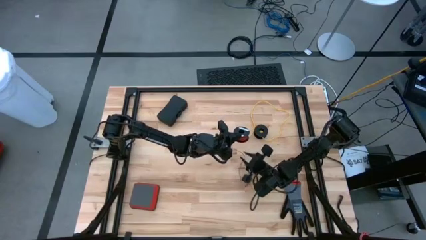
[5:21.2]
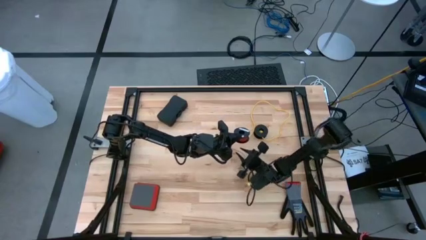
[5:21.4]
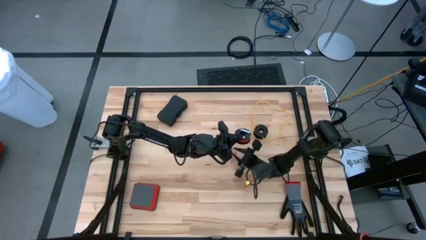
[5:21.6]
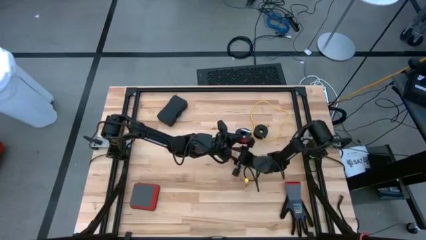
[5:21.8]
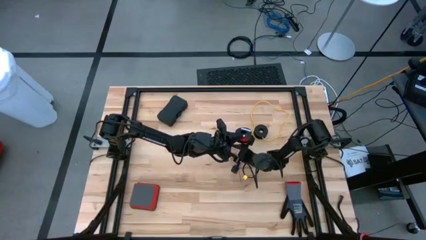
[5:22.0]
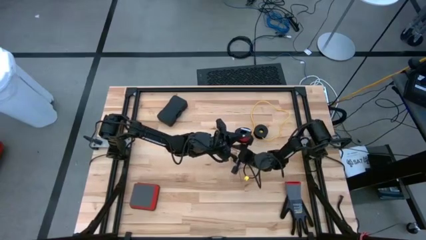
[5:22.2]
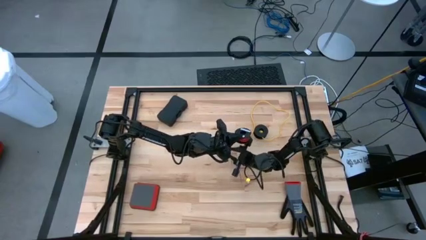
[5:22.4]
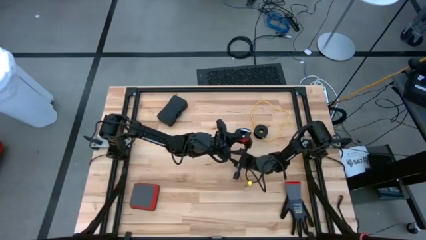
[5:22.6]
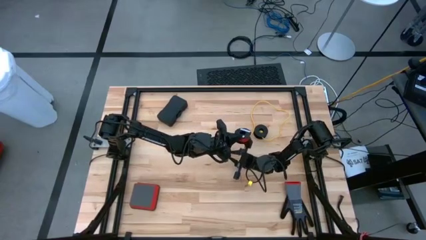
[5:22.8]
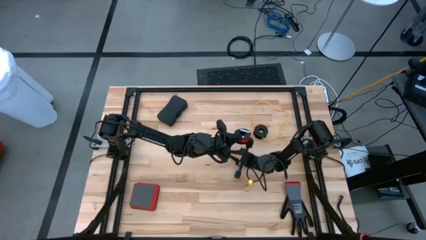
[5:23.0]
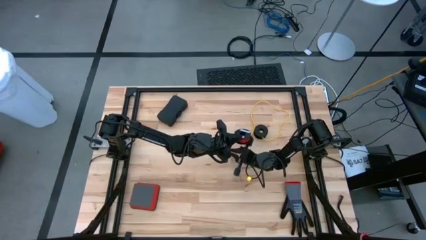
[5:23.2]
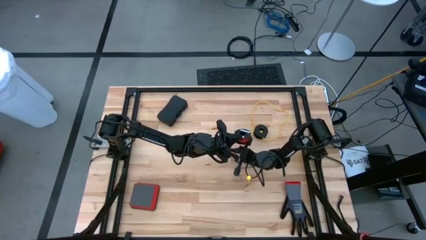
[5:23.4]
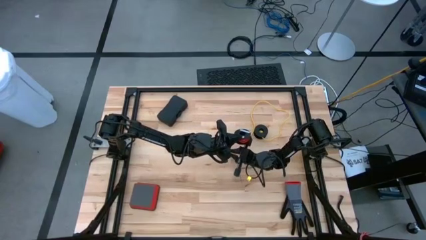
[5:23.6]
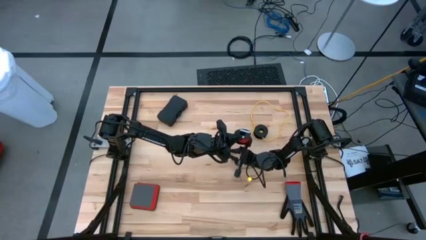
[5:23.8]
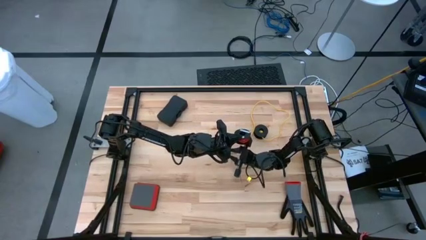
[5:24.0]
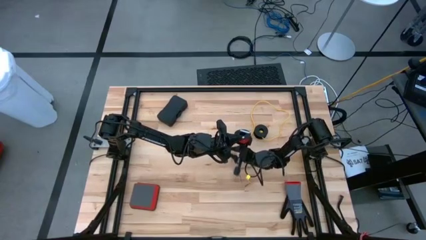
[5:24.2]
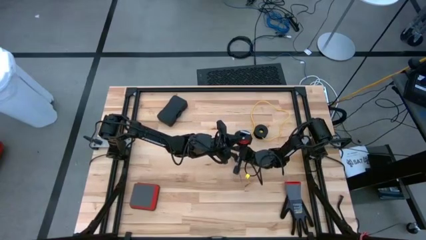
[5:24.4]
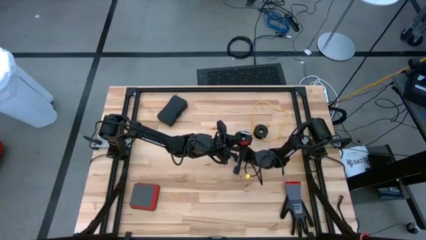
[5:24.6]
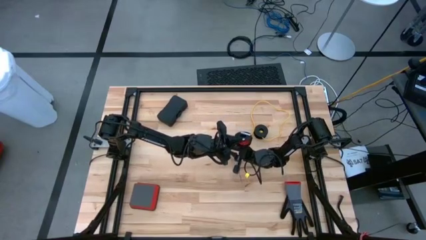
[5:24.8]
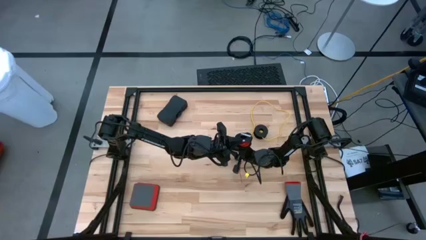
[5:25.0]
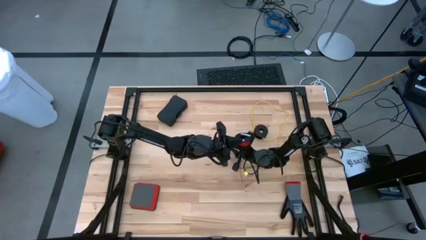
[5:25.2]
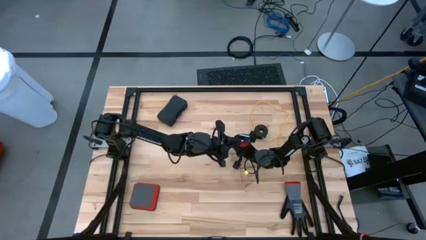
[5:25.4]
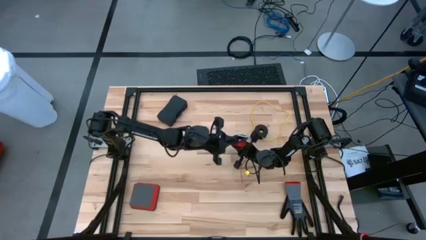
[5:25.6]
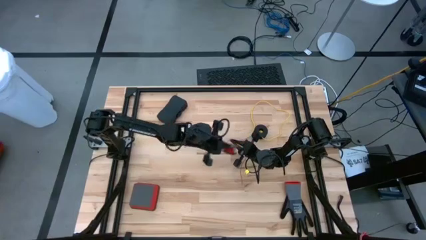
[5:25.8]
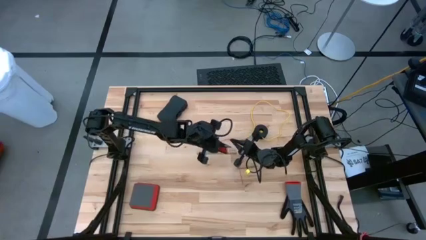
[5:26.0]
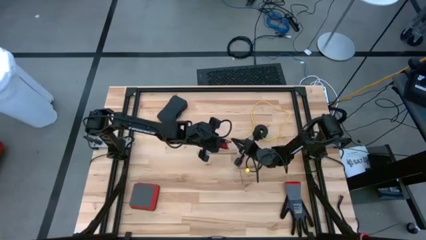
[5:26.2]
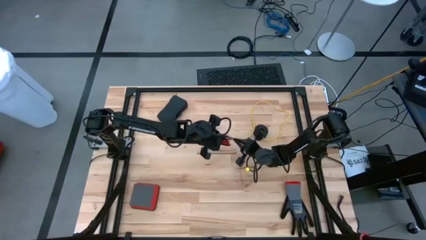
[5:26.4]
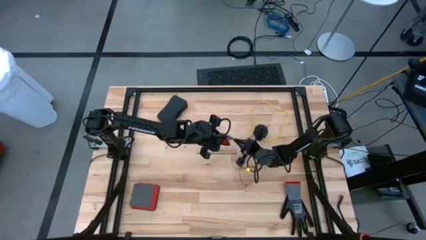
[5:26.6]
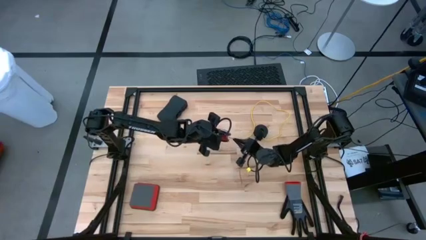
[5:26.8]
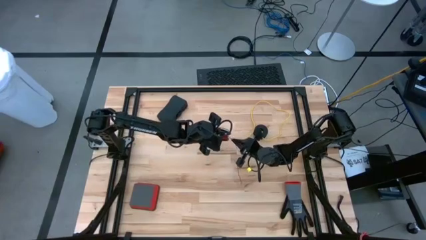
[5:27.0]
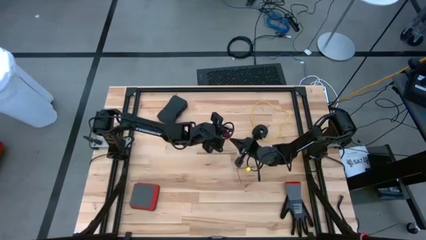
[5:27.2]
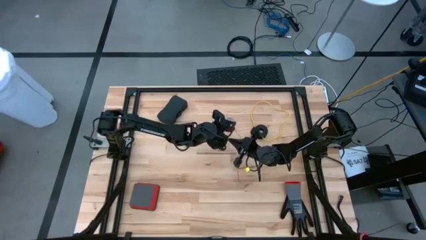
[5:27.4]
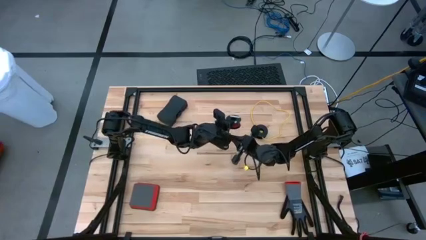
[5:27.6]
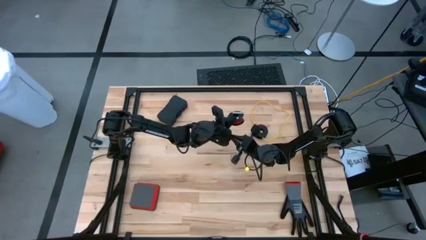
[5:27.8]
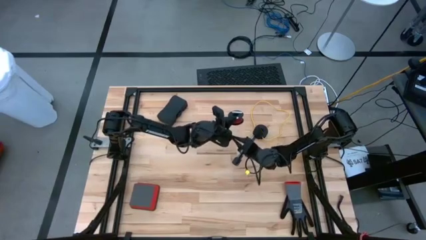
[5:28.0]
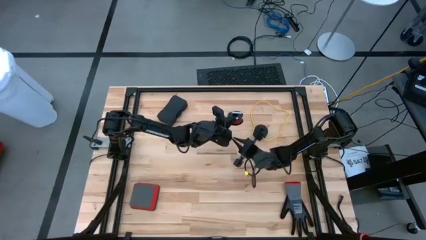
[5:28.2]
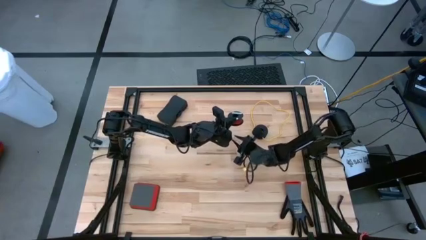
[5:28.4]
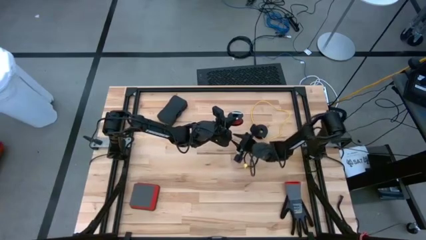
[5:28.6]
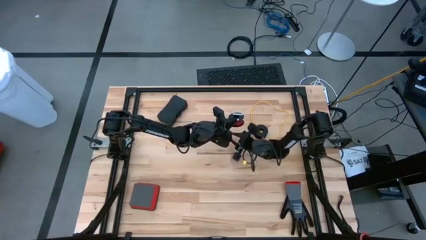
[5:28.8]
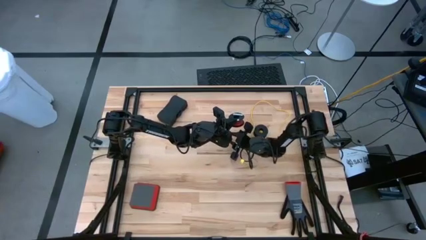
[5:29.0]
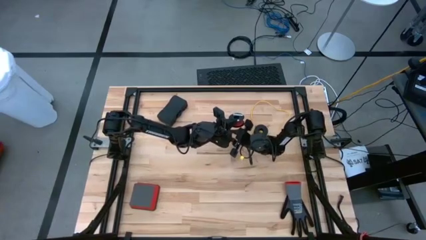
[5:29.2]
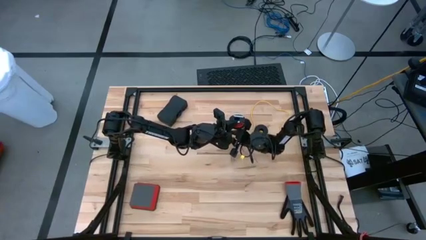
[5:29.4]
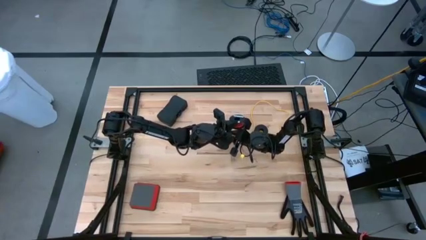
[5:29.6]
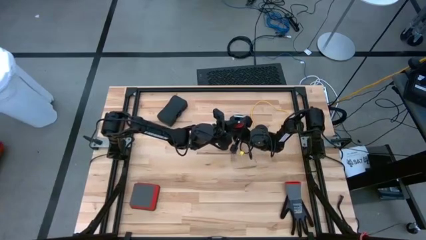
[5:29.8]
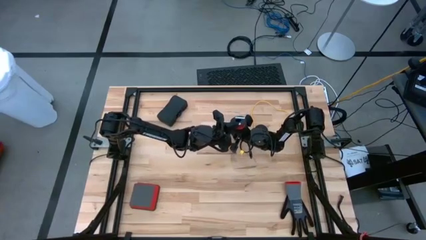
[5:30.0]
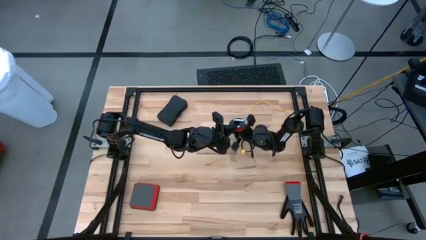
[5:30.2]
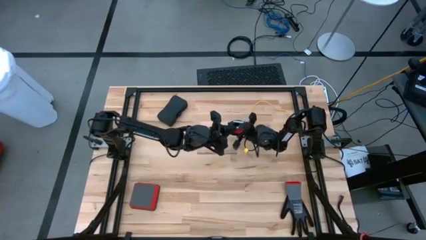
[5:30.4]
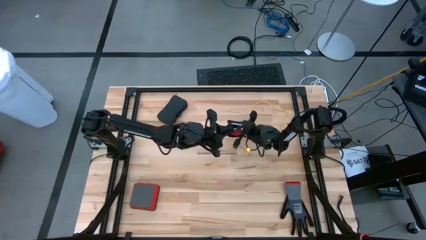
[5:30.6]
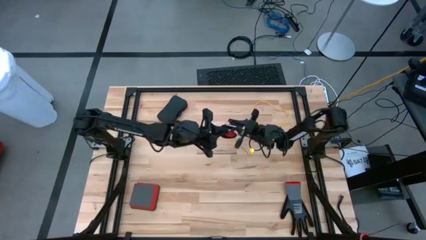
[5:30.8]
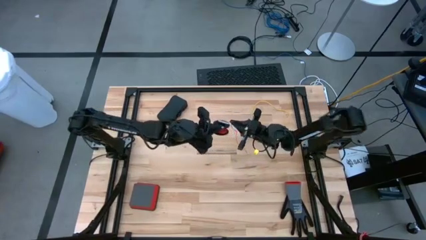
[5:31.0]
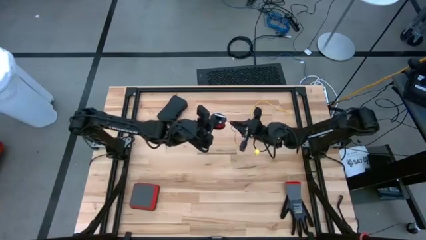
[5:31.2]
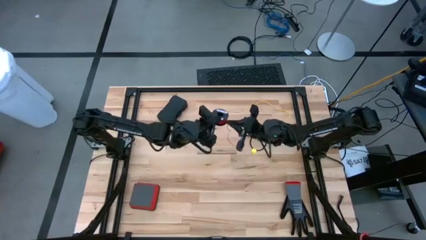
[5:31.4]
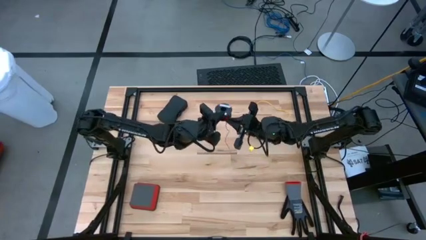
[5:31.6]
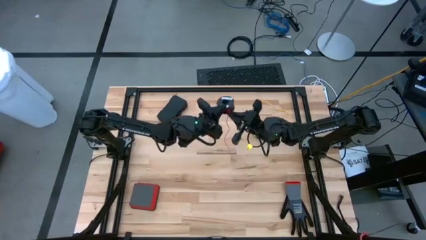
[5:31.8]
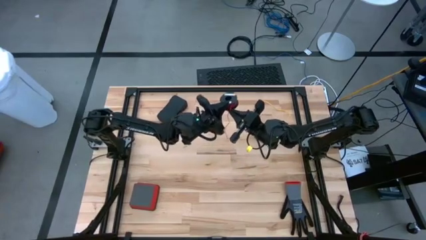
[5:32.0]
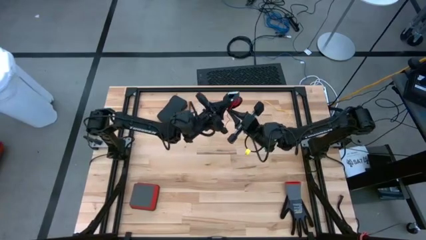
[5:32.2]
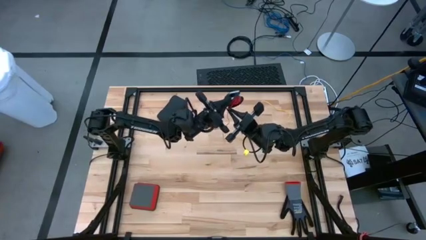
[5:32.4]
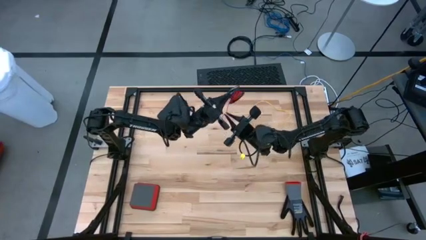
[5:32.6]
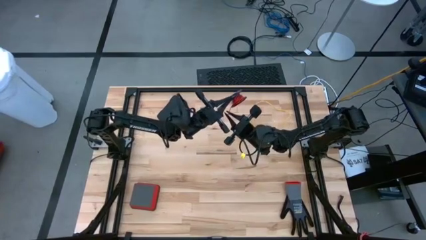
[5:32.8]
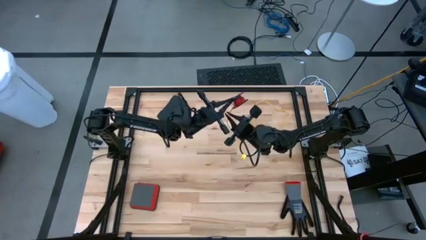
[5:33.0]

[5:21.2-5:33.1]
Task: Coil cords
Coil the red wire onto the black spool
